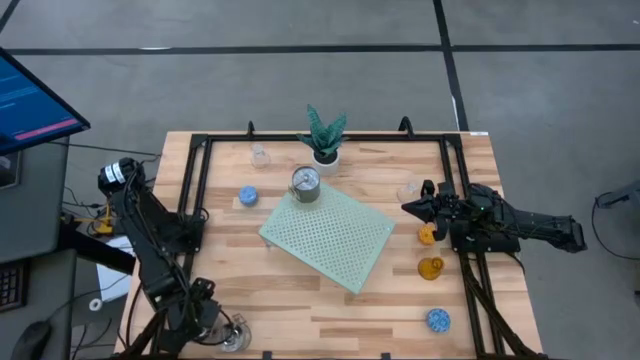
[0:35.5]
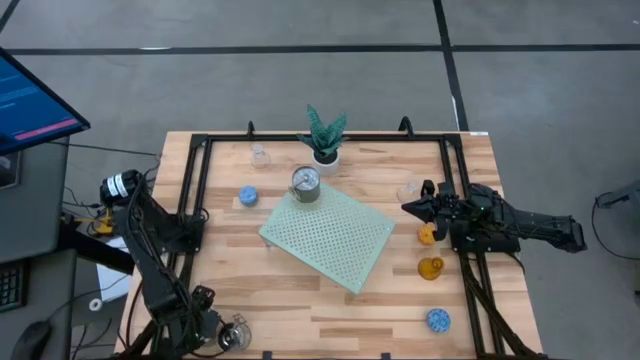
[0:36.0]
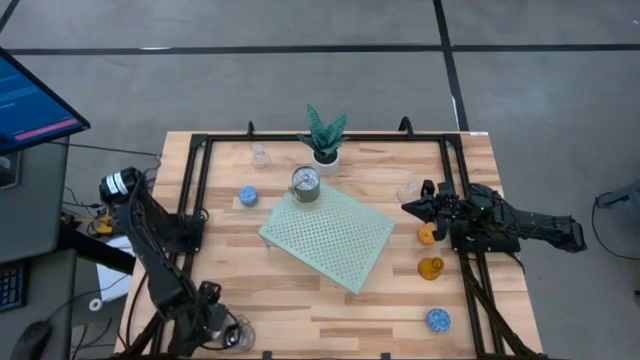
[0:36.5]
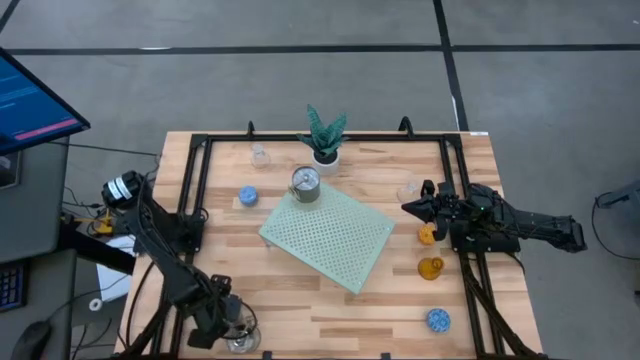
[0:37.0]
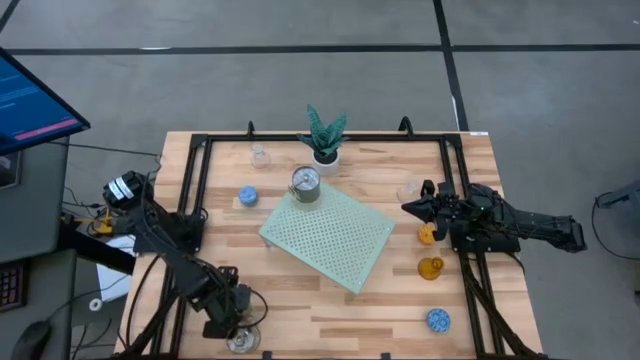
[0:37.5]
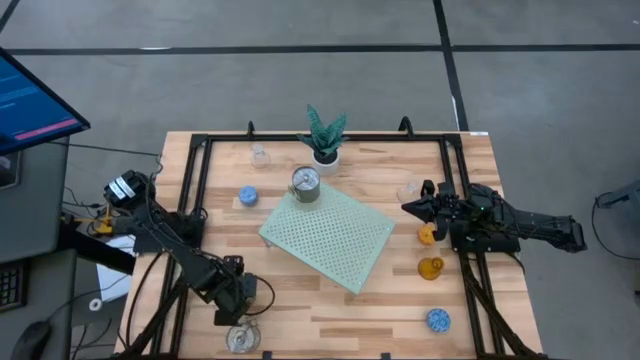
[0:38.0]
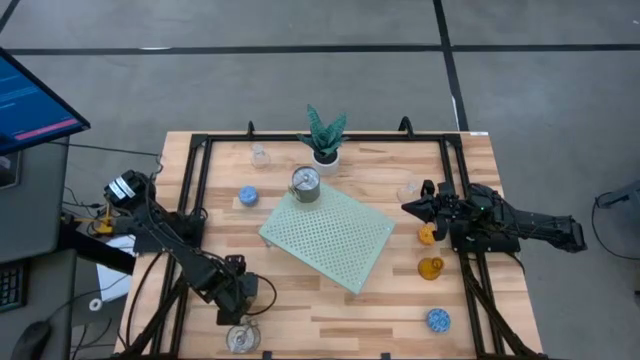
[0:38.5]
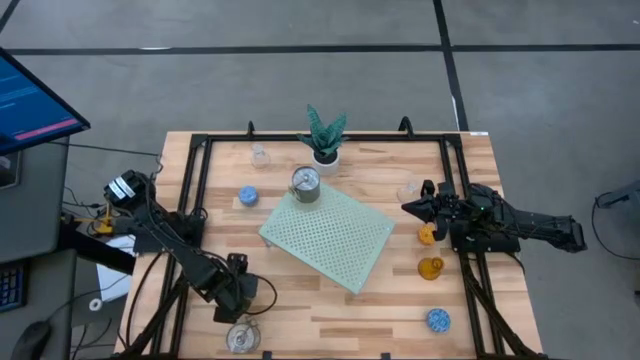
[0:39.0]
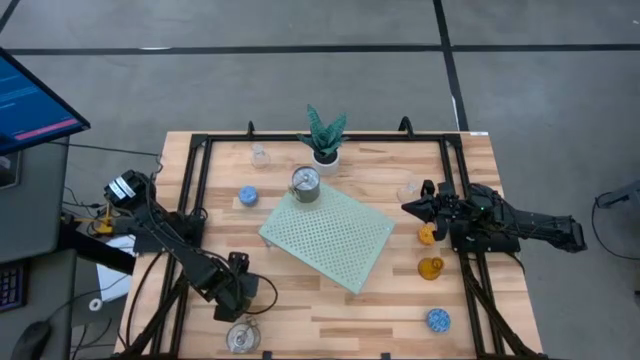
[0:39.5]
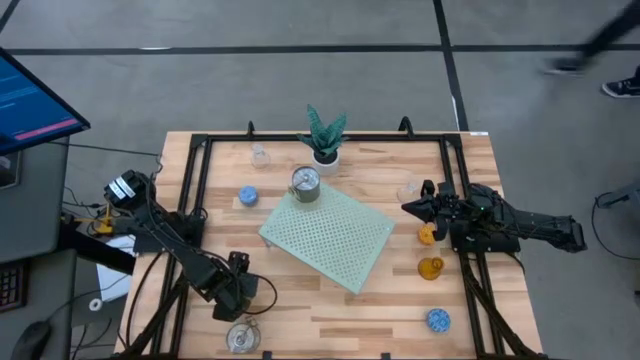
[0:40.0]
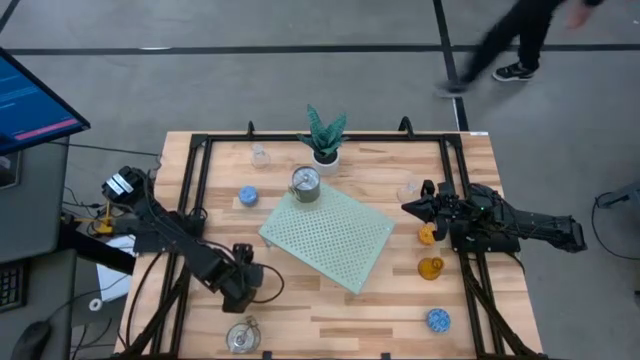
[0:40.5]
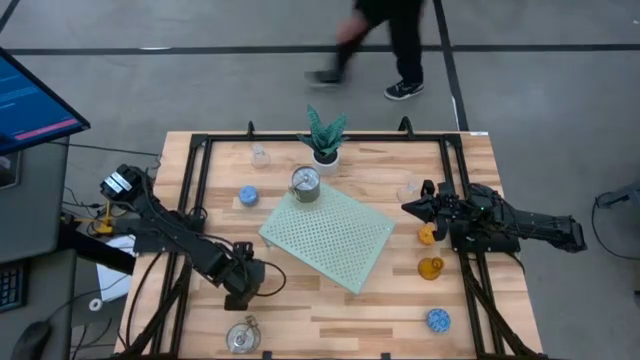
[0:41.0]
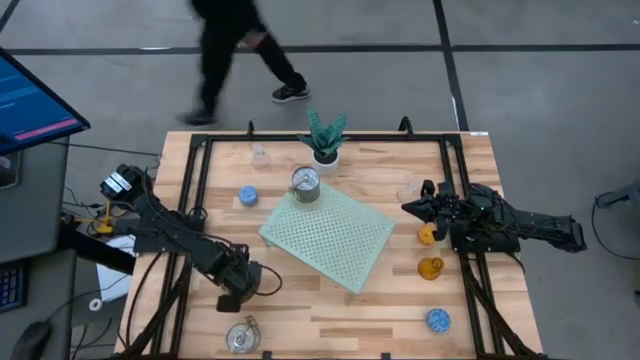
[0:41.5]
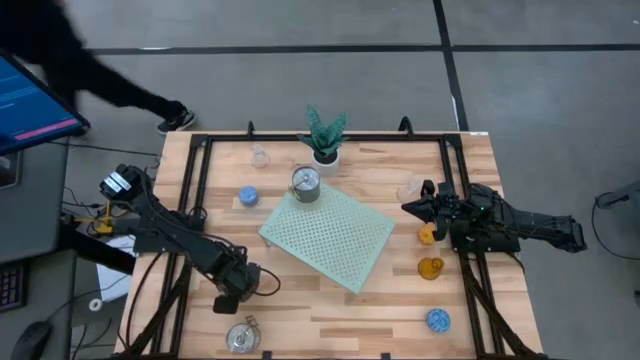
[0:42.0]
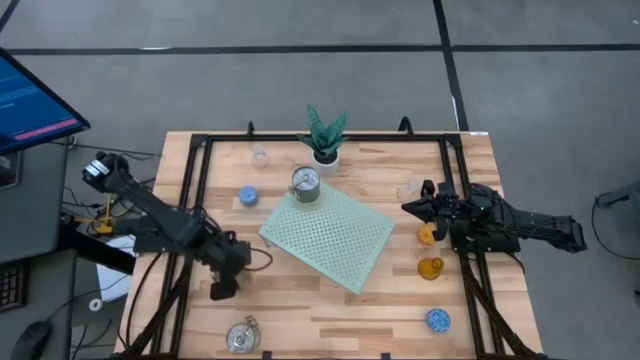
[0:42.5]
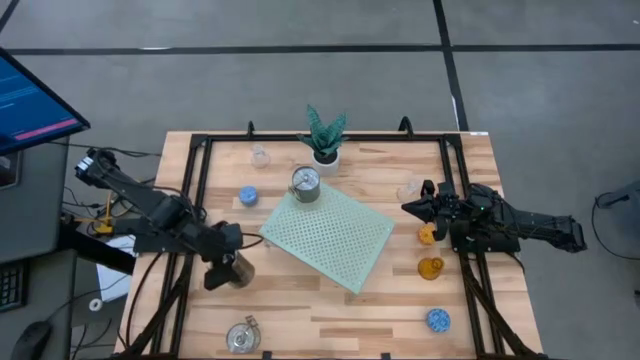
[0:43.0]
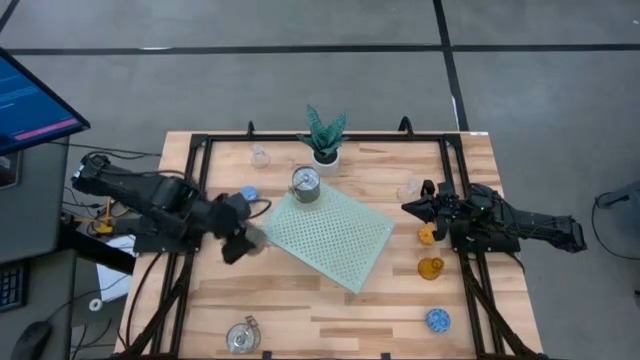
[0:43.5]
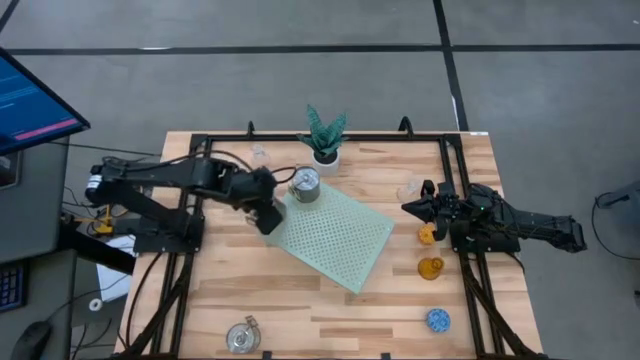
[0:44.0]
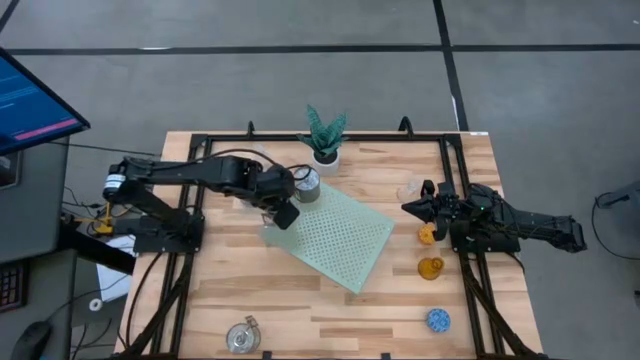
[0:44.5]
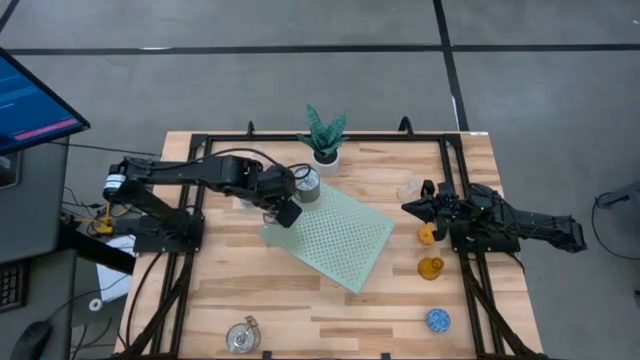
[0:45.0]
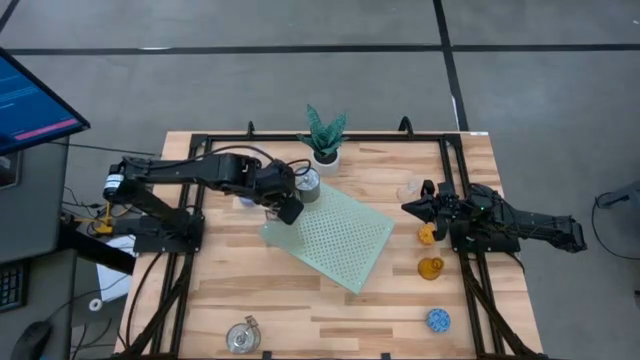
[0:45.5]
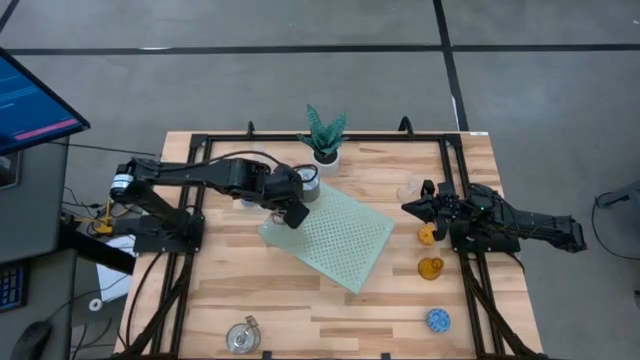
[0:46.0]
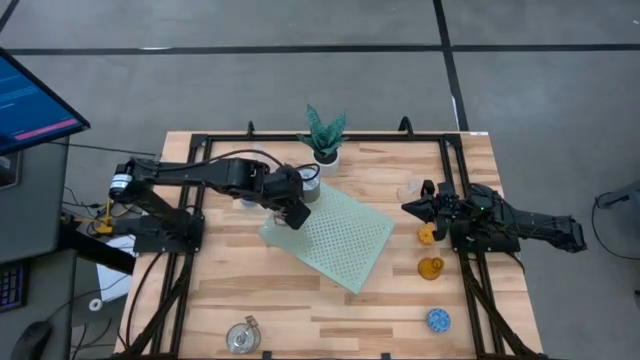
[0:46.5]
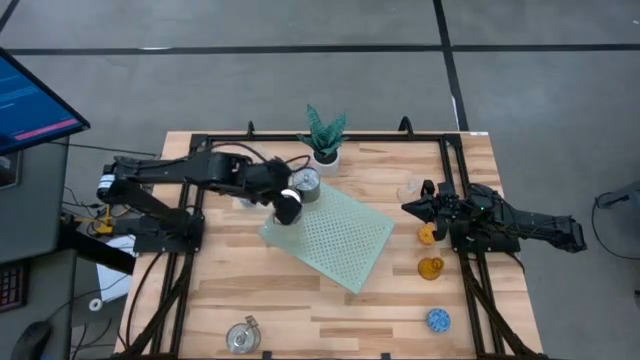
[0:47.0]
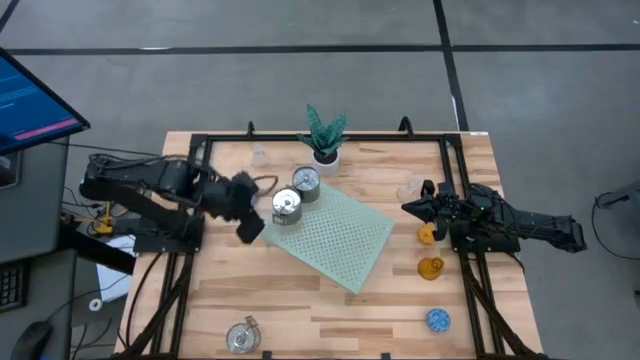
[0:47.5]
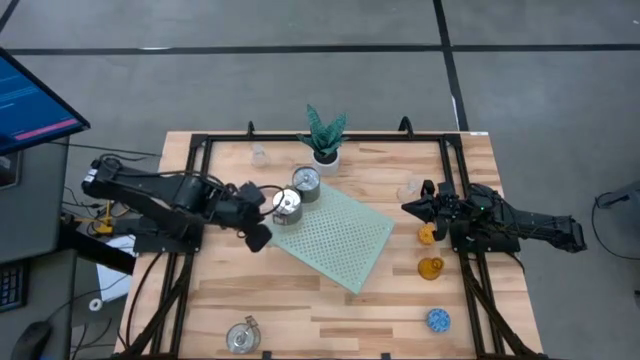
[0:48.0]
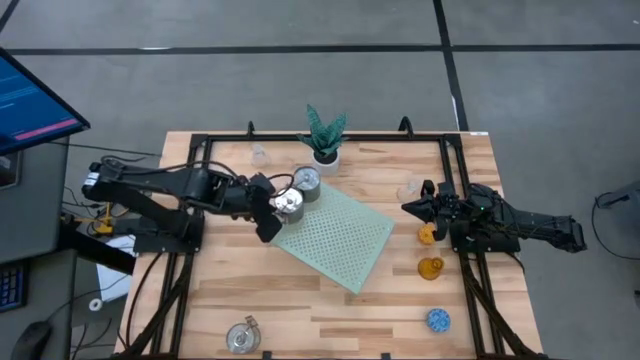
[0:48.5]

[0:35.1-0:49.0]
Task: Pick & Place candle stick holders
Put the left silver scented candle on the shelf

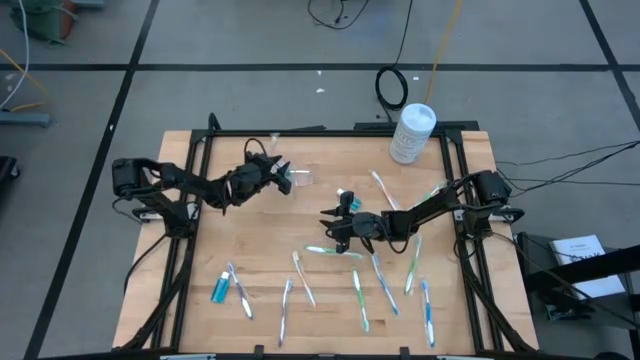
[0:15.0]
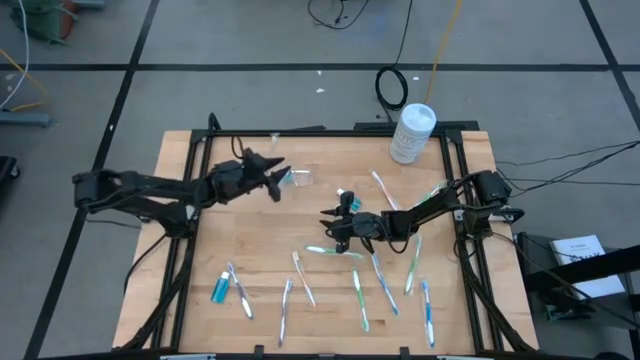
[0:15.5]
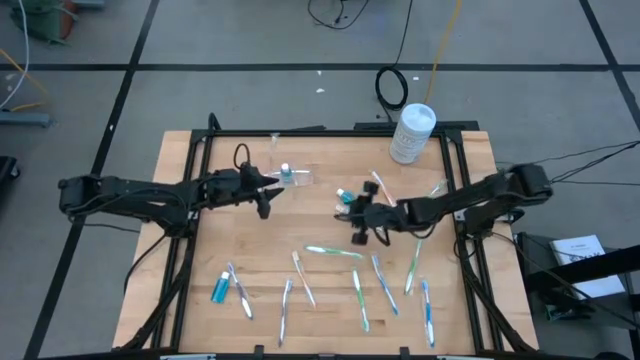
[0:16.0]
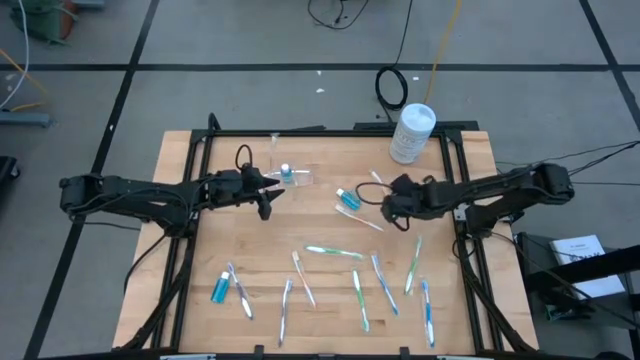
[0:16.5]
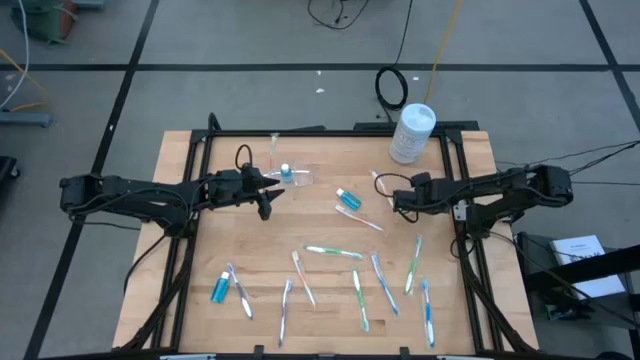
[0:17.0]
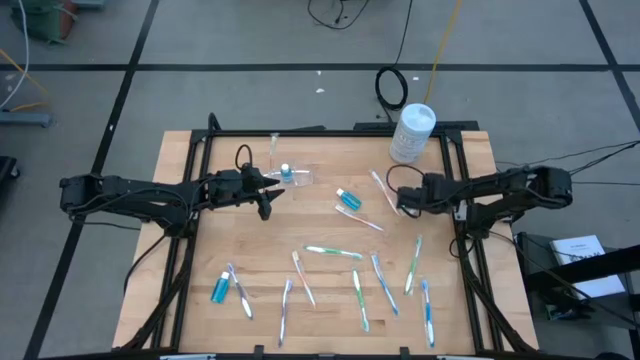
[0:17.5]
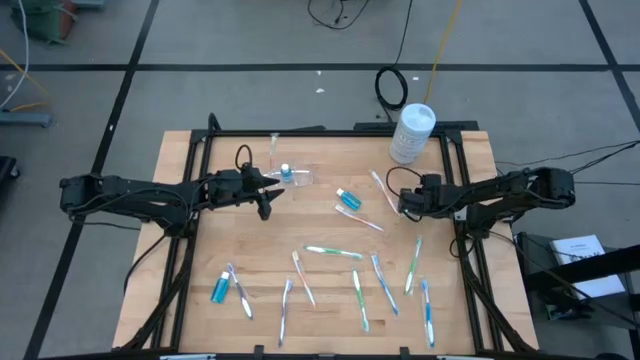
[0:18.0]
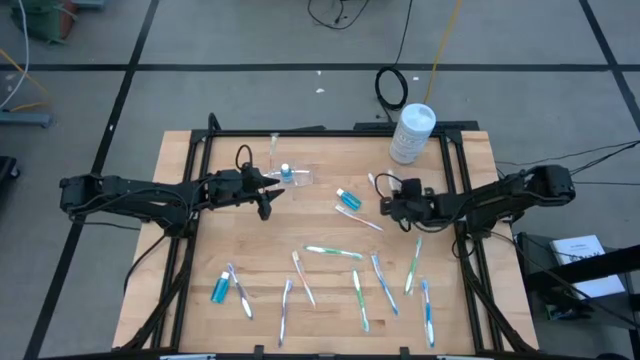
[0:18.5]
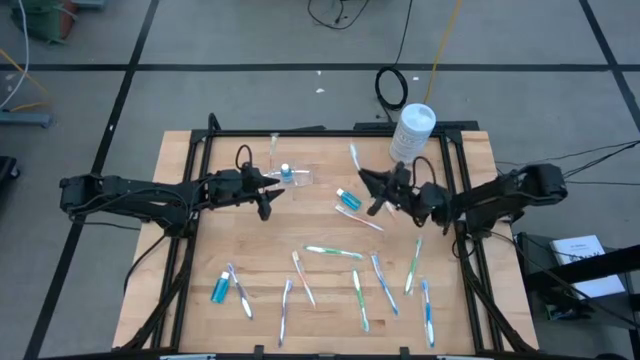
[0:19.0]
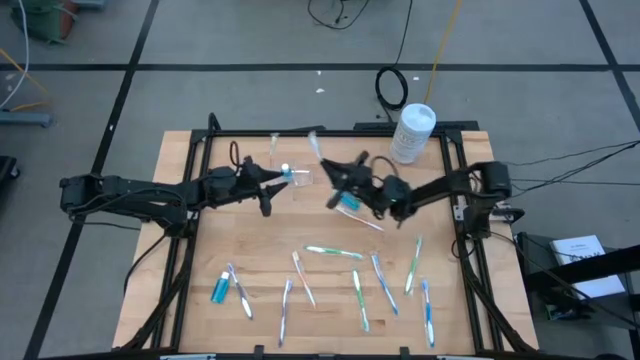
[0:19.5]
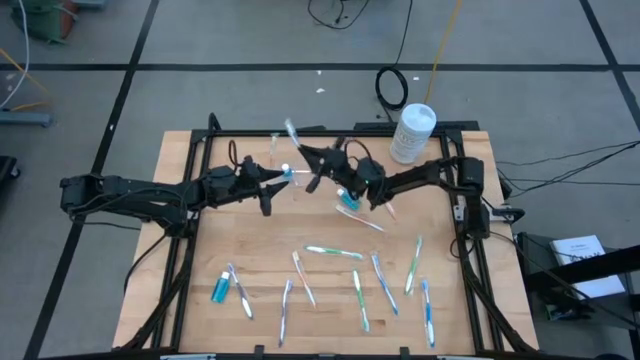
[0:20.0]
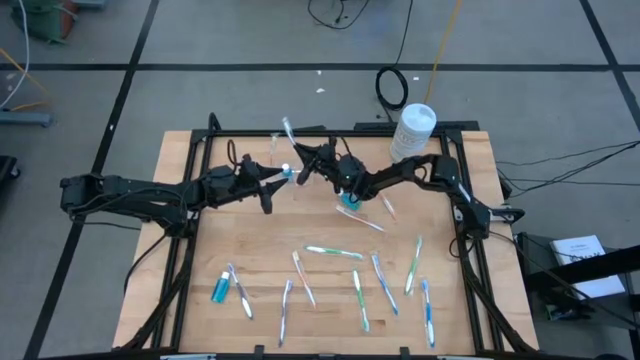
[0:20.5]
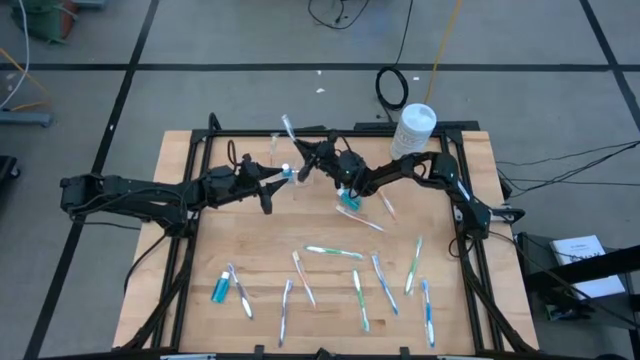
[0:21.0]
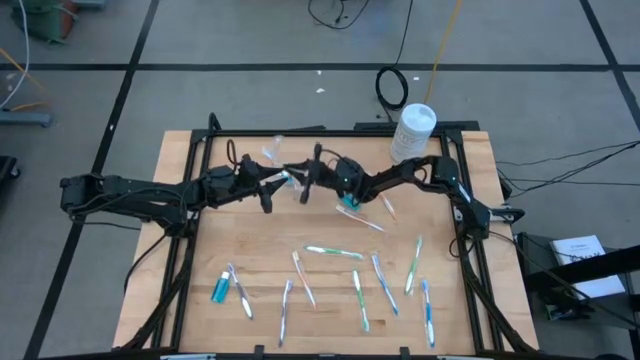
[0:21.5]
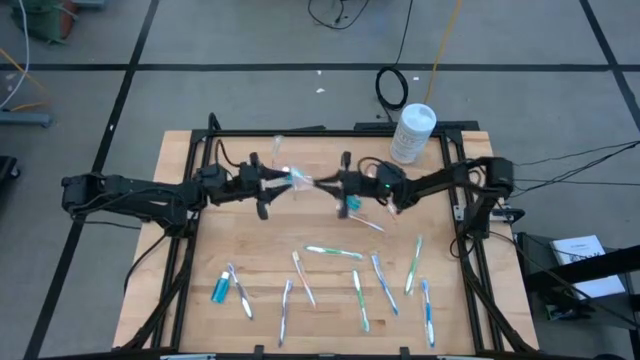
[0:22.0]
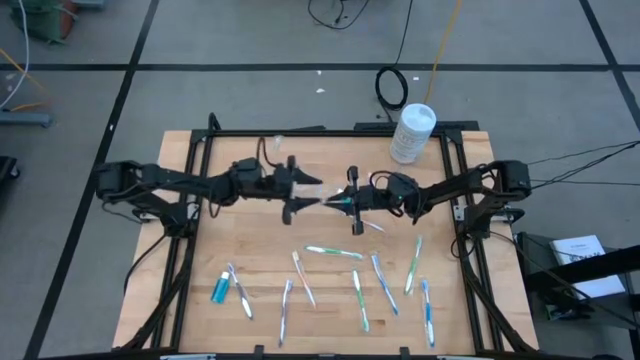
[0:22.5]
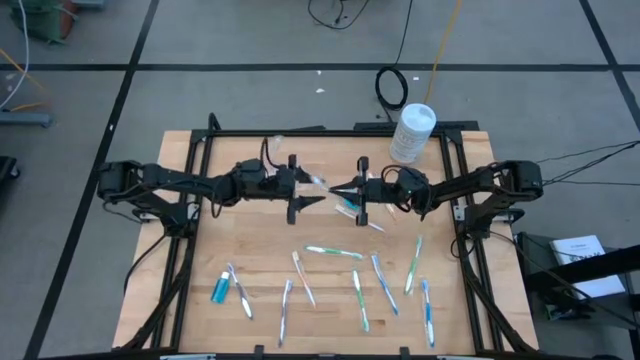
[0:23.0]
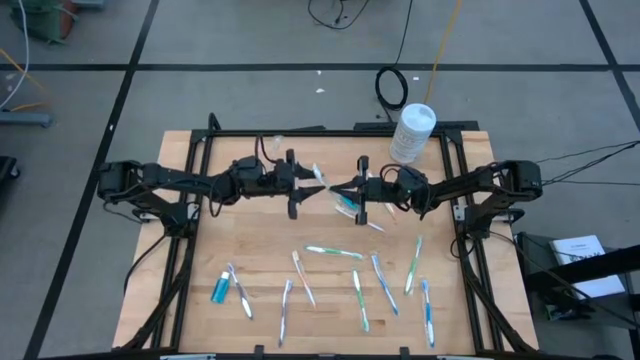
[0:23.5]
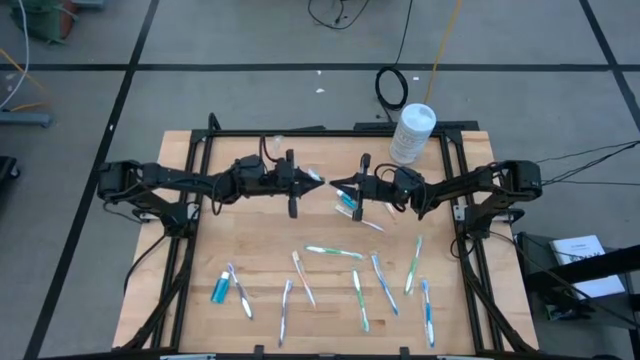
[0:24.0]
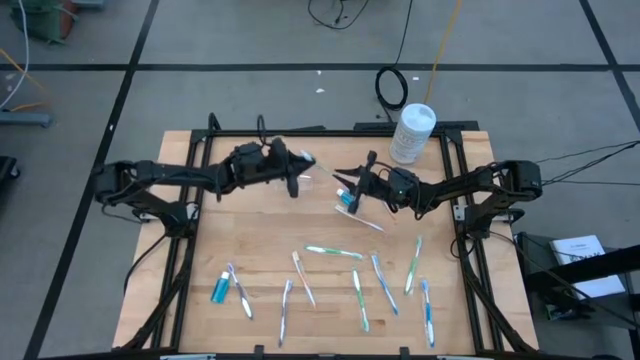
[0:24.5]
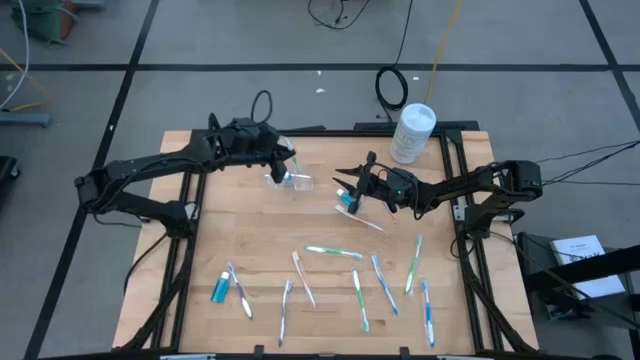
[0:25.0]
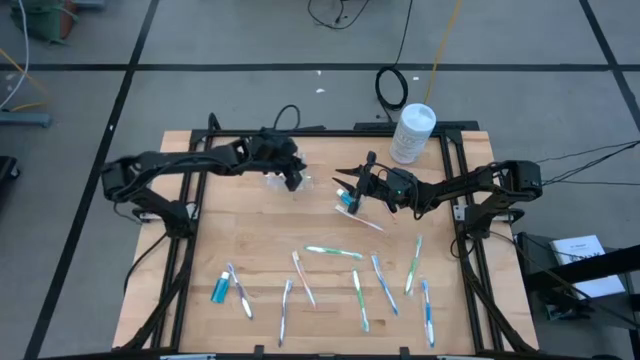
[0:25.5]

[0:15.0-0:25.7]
Task: Pick & Place toothbrushing station
Put the green toothbrush into the transparent organizer
